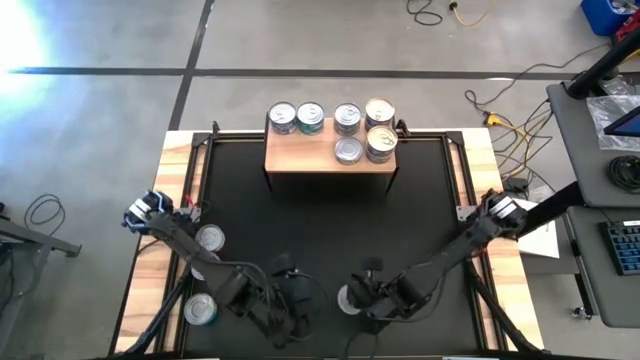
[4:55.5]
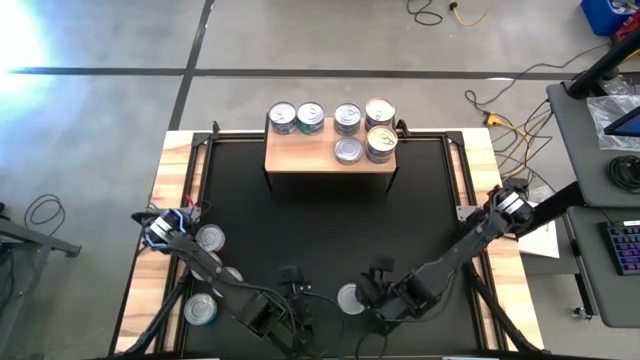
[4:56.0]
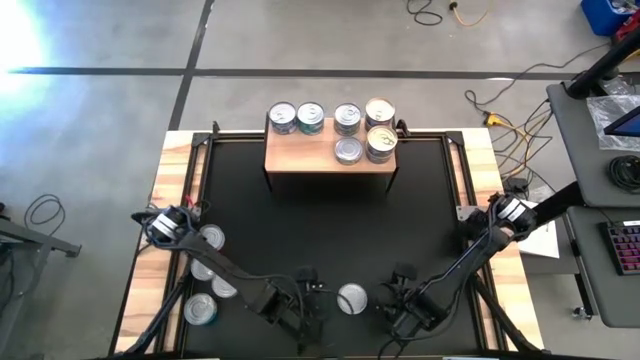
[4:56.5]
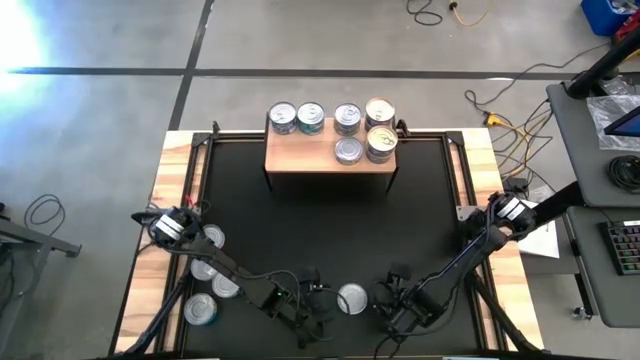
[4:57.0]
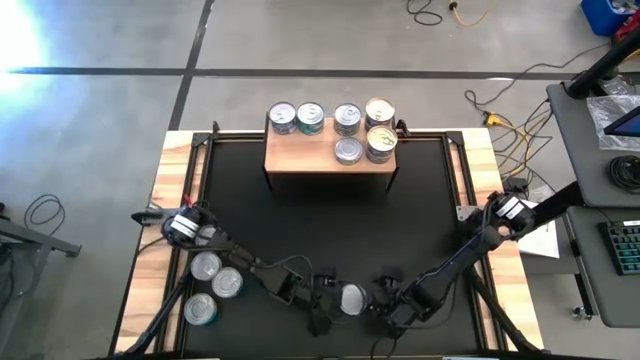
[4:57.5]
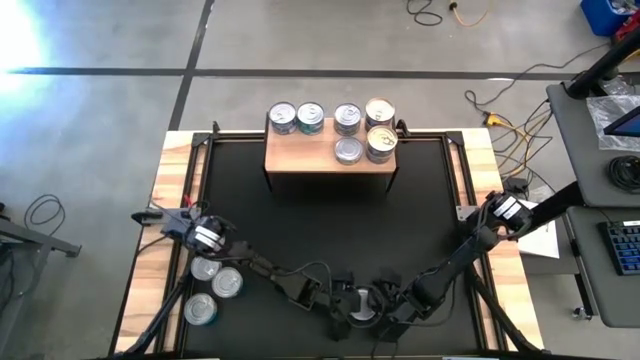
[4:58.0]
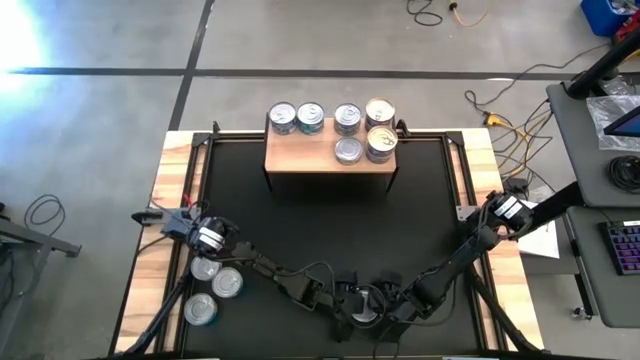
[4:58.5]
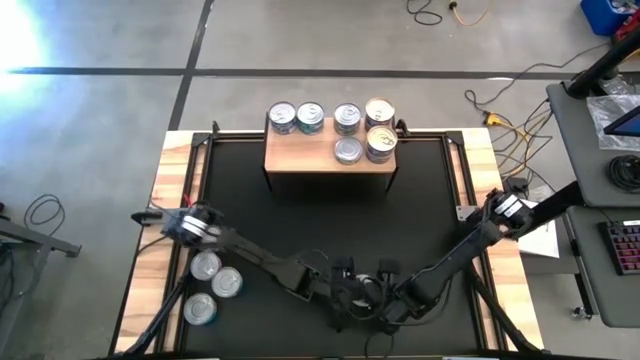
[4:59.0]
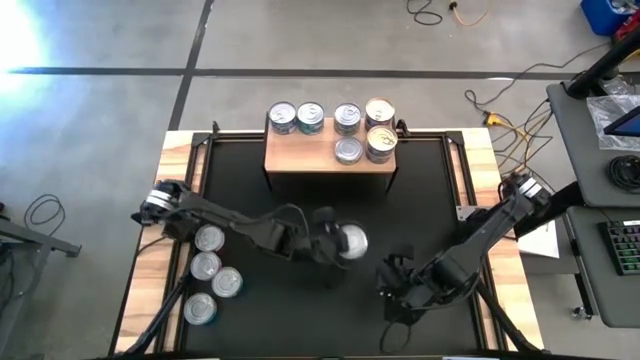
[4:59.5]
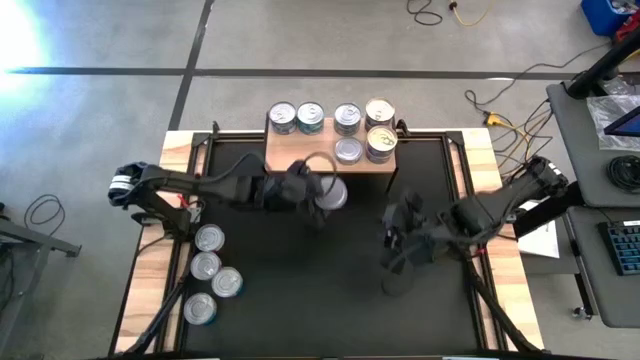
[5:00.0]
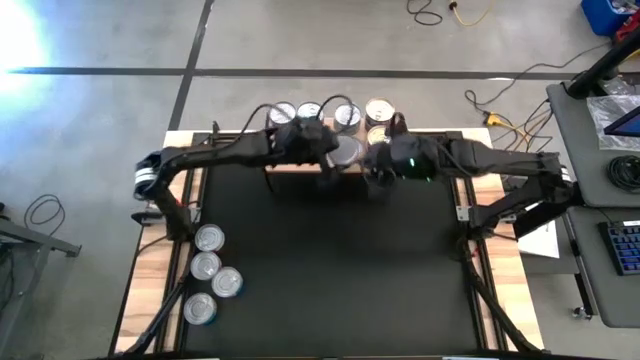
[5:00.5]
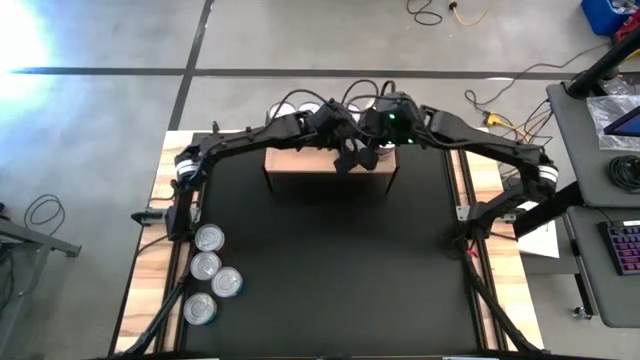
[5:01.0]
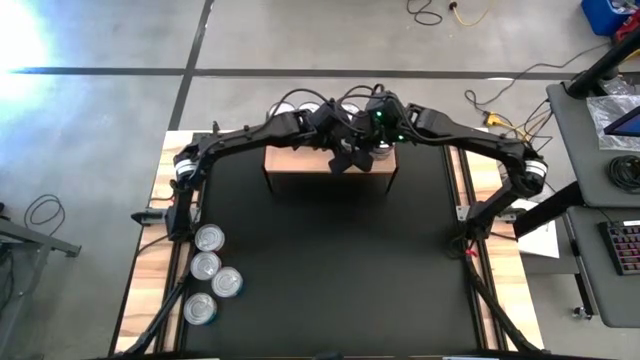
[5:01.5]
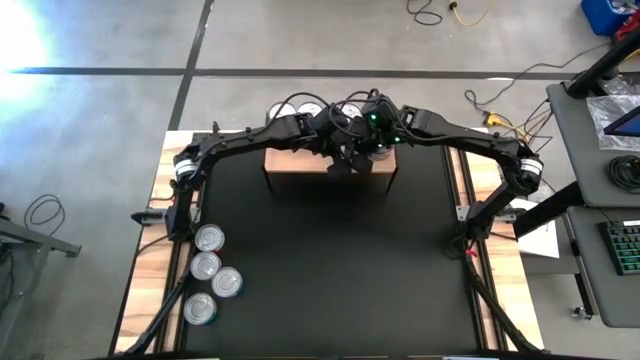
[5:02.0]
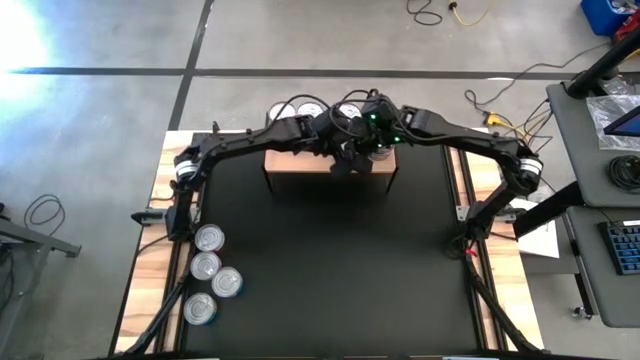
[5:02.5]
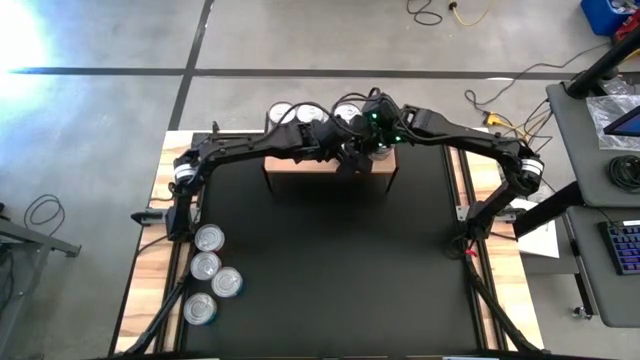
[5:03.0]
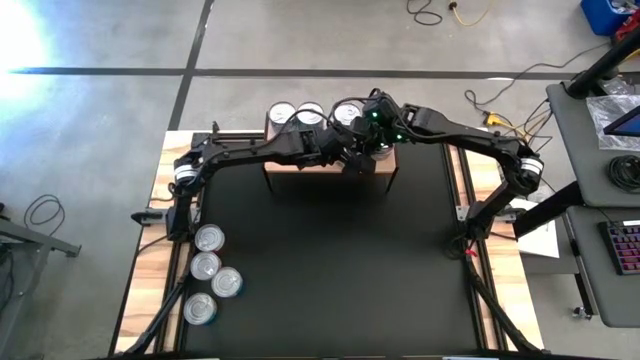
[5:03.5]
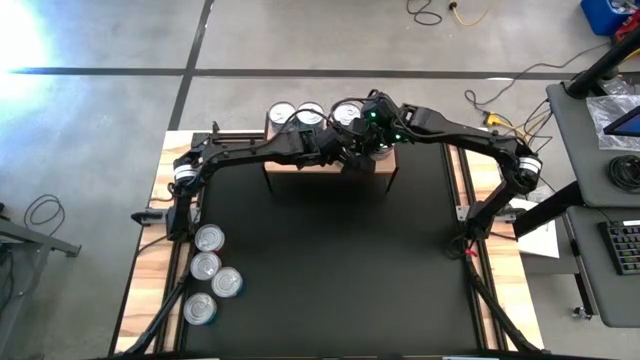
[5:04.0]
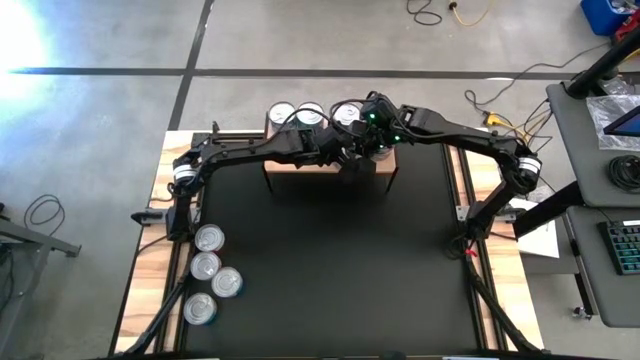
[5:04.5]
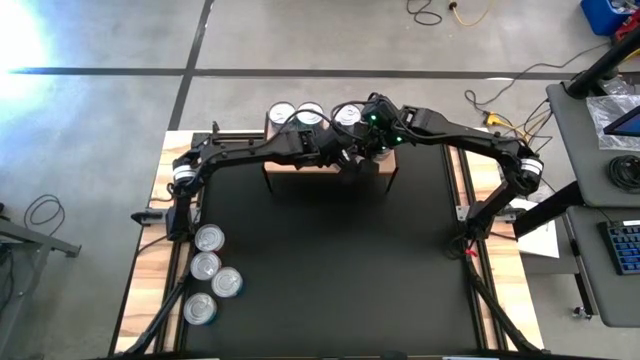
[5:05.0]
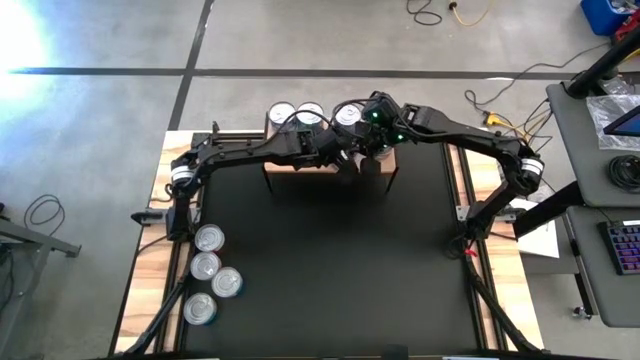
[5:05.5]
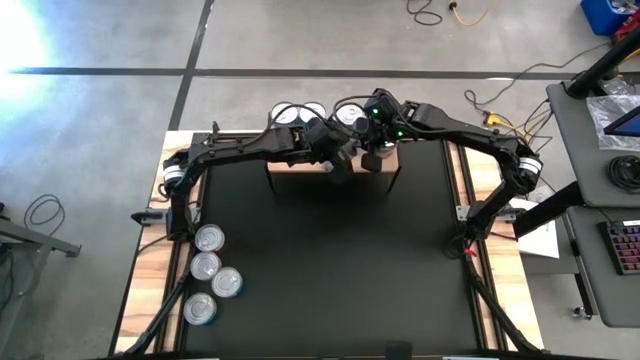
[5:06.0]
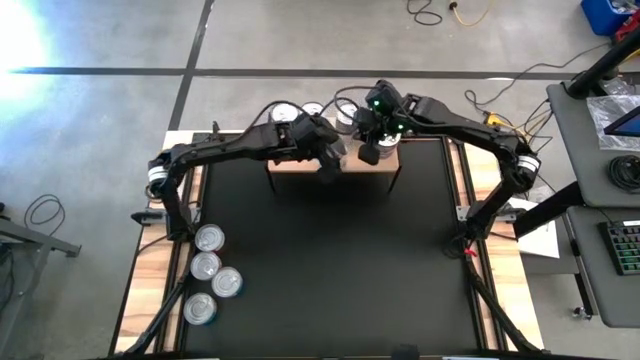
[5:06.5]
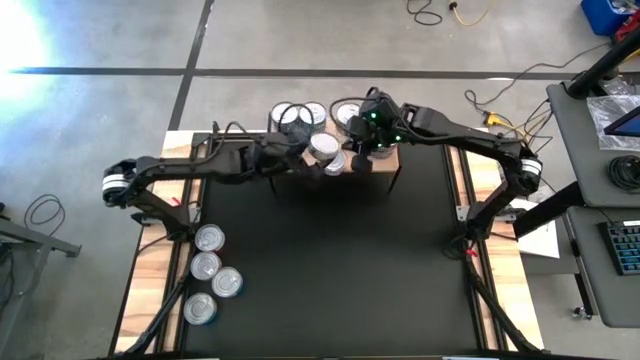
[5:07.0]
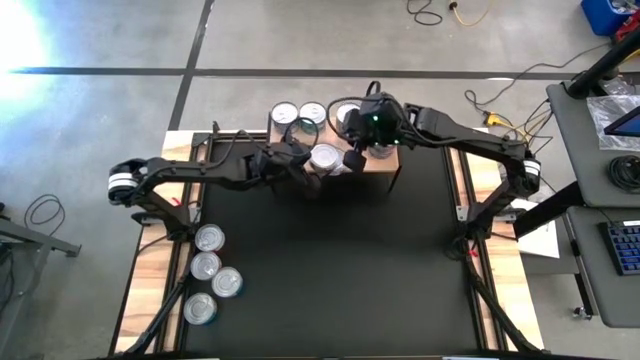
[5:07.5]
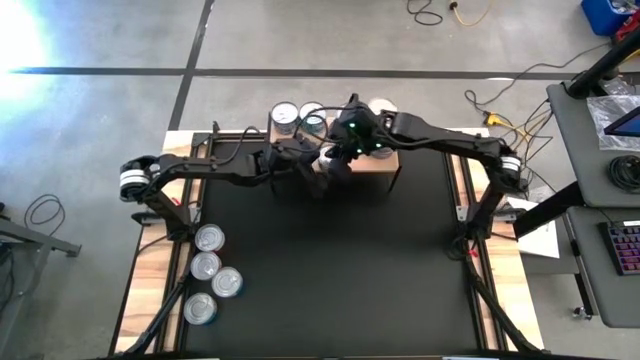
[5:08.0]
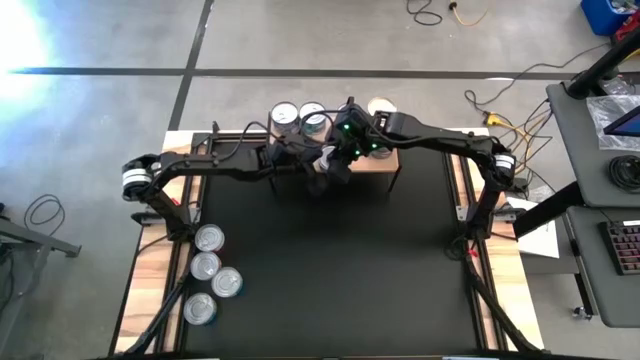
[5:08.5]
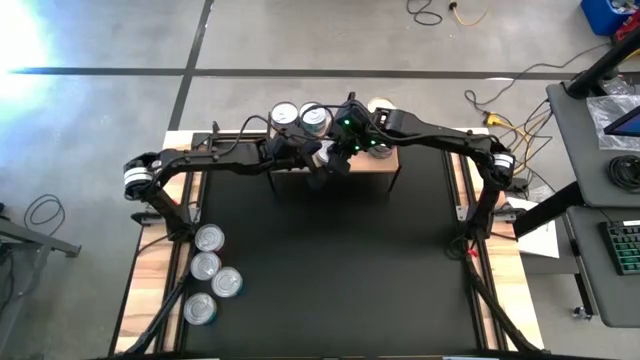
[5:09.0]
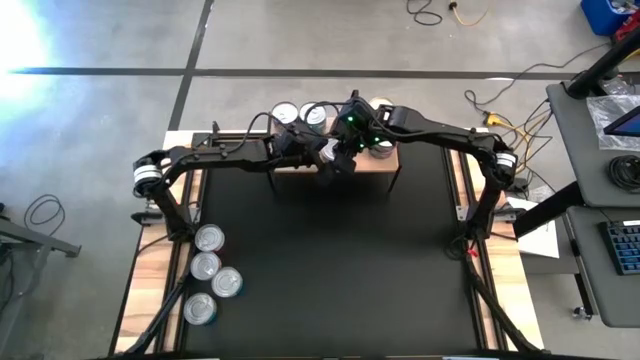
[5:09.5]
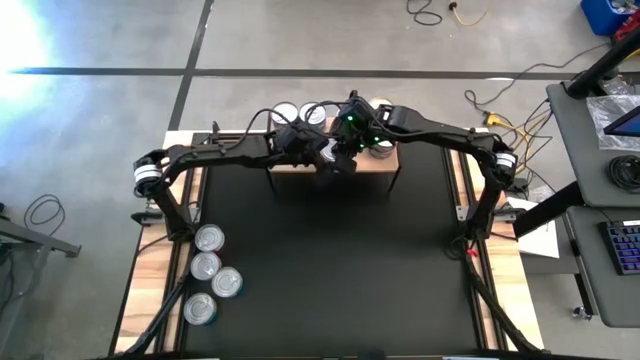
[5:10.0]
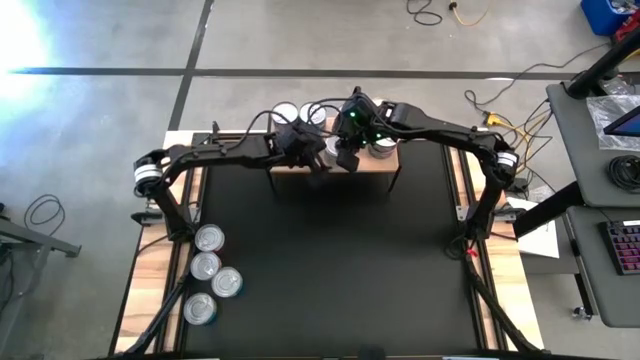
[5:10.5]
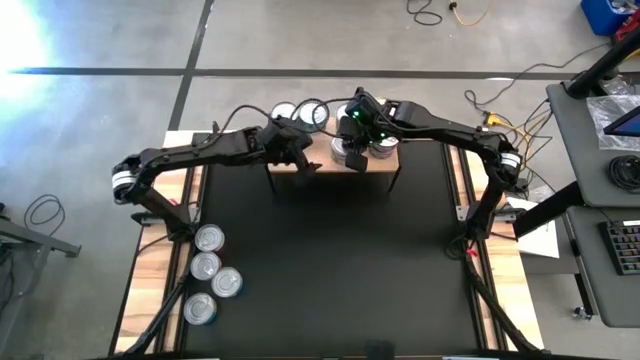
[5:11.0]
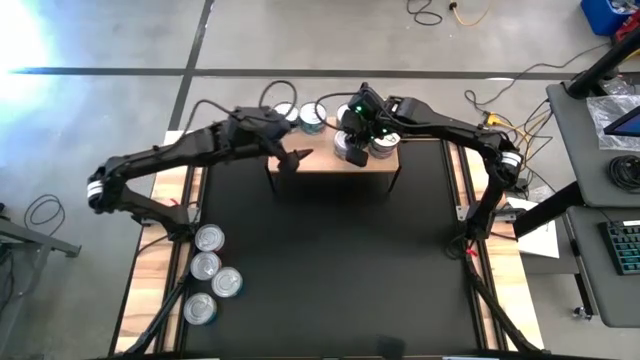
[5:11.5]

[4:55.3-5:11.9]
Task: Stack canned seafood by type on shelf
Stack the green tuna can on top of the green tuna can

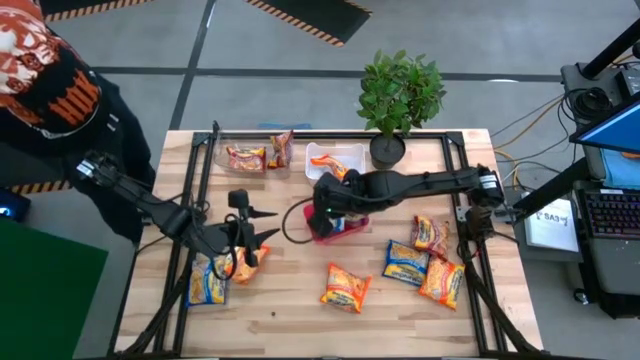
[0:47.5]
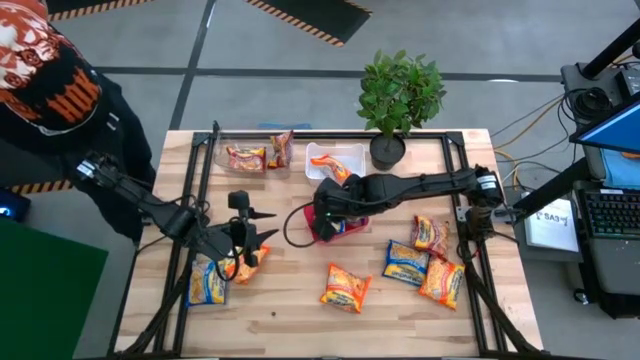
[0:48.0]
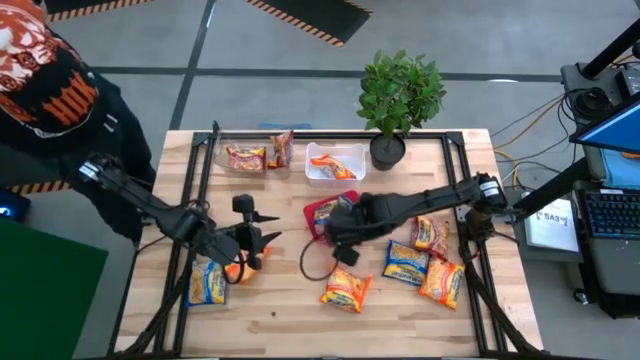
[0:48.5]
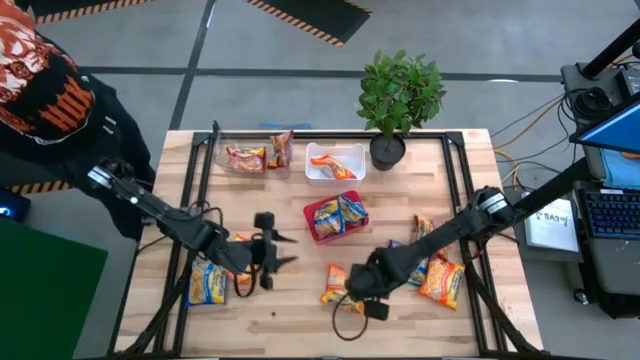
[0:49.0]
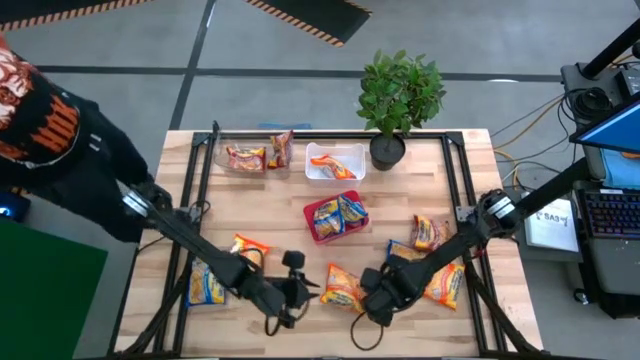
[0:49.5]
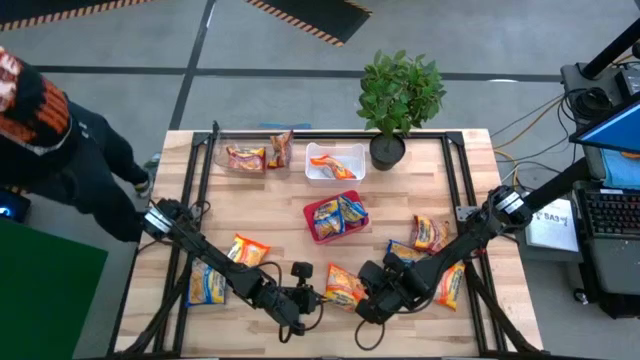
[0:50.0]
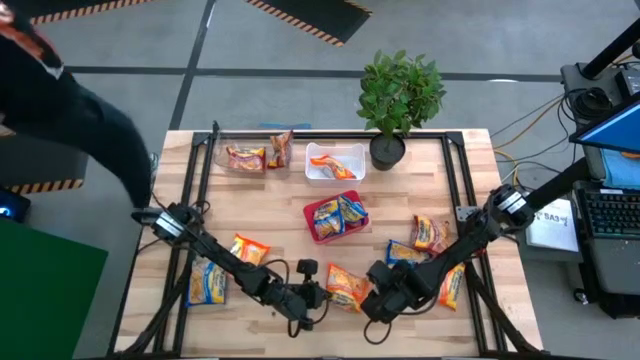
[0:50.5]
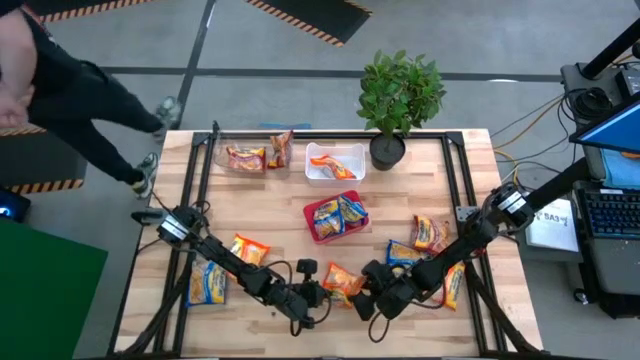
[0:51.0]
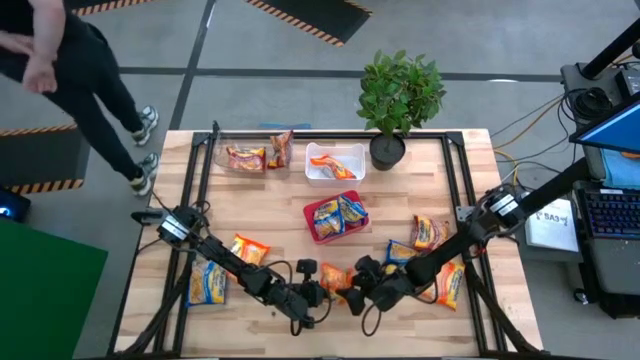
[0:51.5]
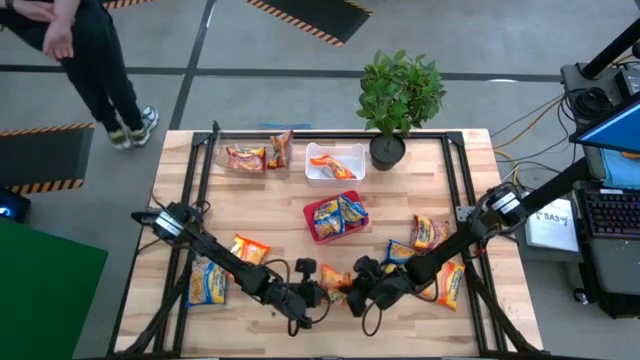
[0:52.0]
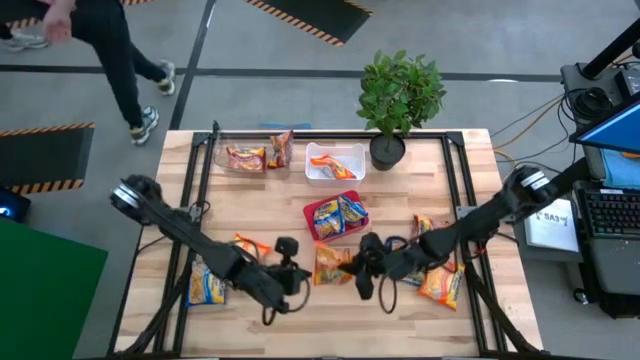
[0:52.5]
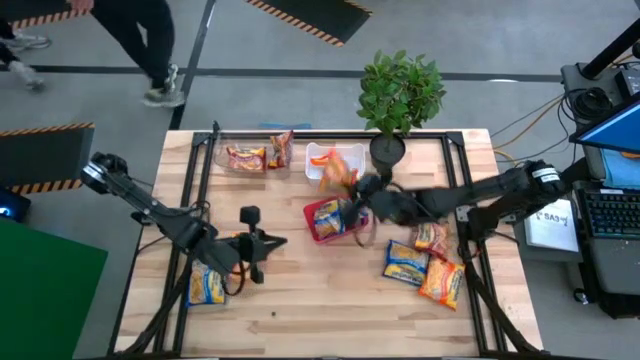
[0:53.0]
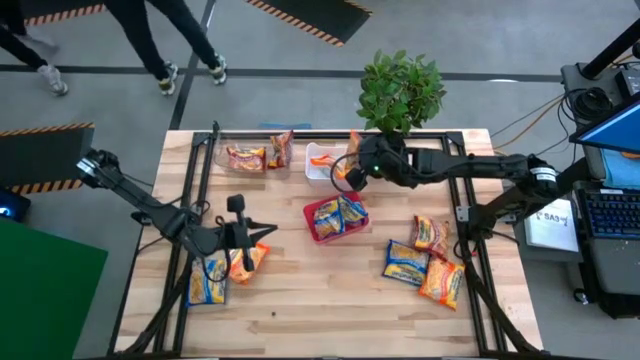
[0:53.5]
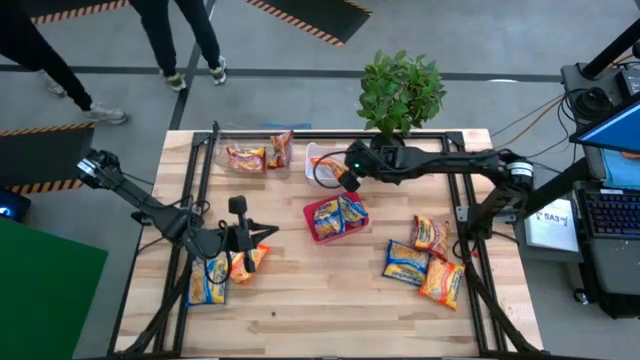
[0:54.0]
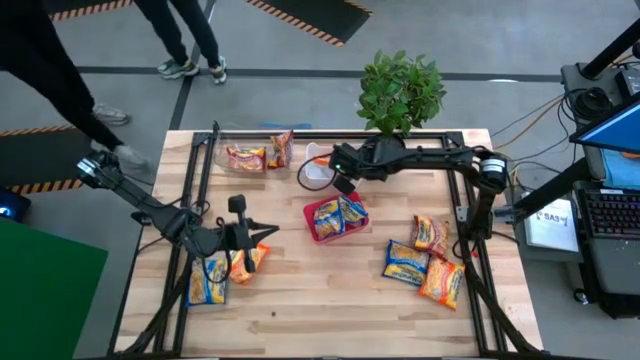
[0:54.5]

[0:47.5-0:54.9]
Task: Sort Maruchan noodles
Put the orange noodle pack into the white bin
